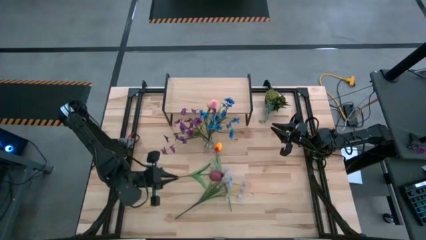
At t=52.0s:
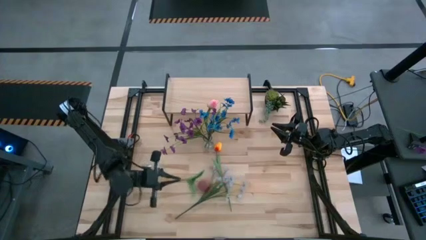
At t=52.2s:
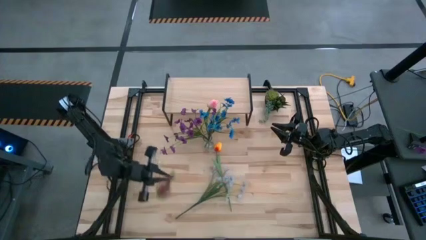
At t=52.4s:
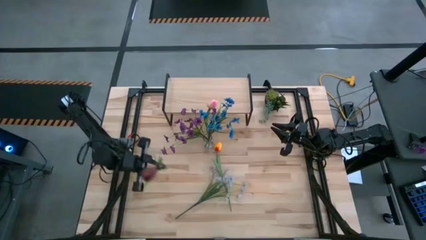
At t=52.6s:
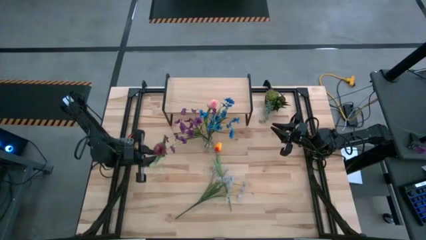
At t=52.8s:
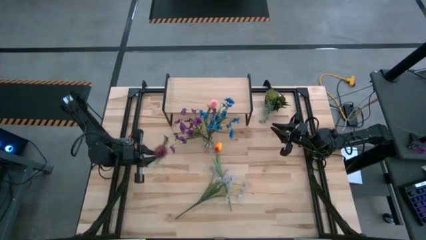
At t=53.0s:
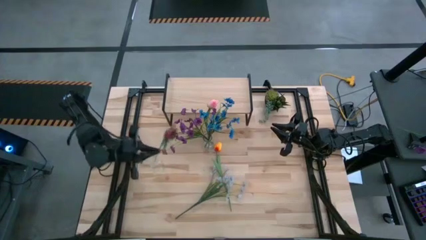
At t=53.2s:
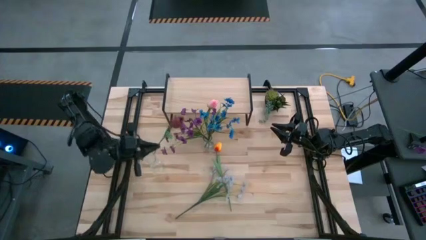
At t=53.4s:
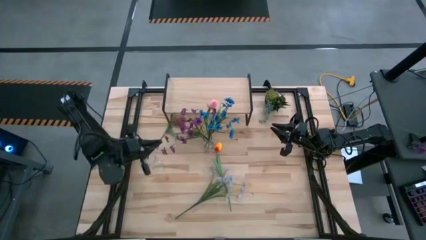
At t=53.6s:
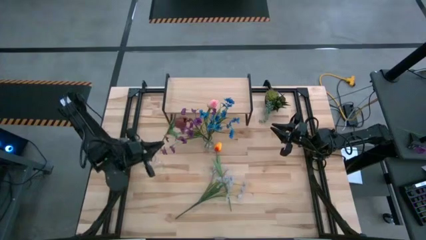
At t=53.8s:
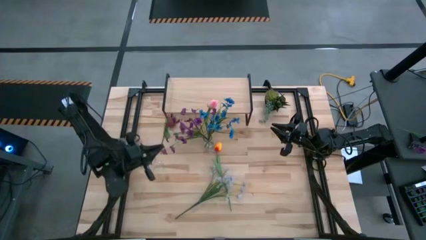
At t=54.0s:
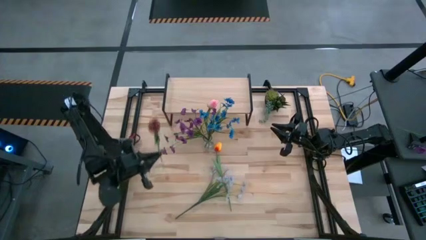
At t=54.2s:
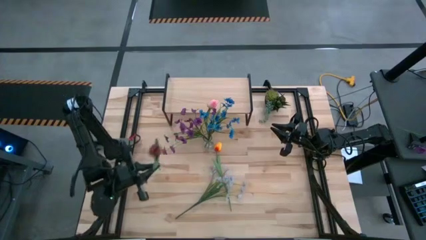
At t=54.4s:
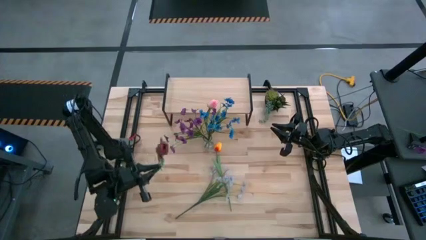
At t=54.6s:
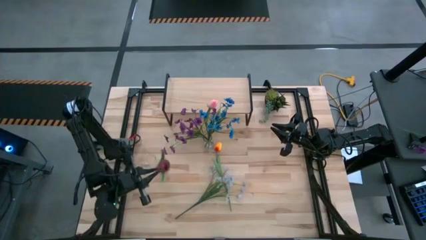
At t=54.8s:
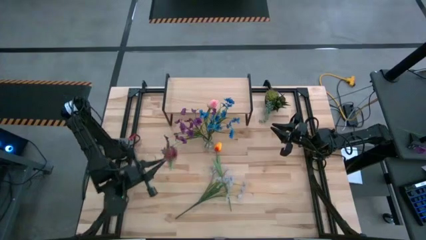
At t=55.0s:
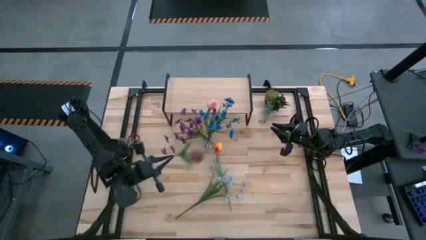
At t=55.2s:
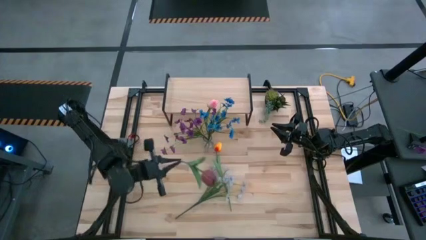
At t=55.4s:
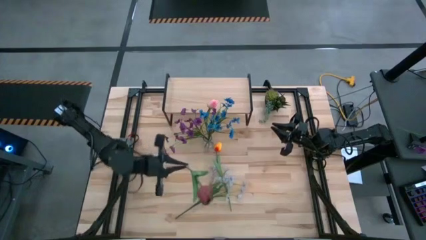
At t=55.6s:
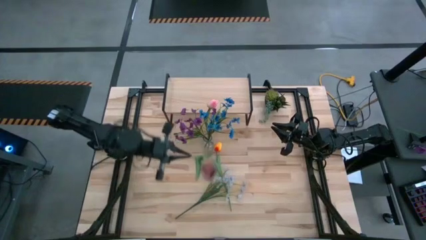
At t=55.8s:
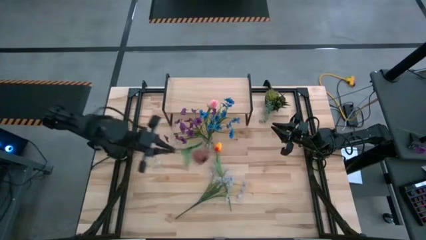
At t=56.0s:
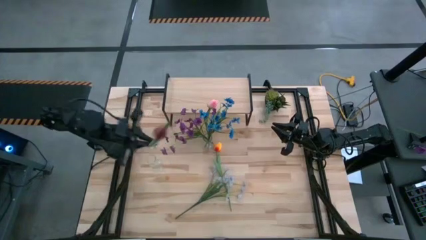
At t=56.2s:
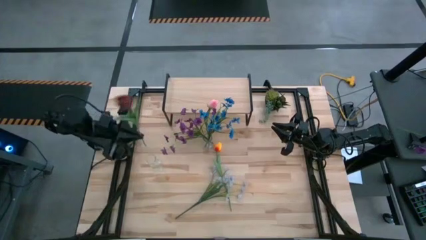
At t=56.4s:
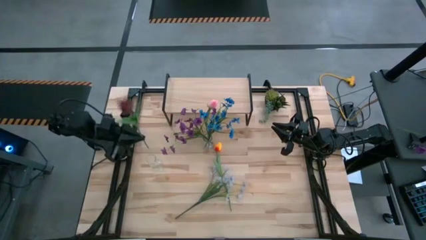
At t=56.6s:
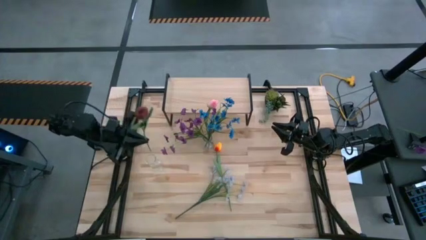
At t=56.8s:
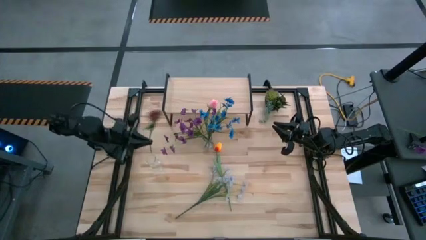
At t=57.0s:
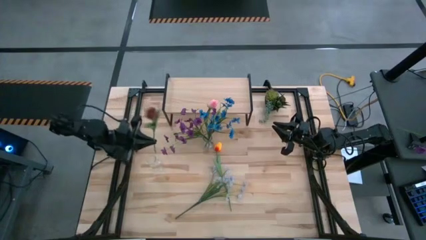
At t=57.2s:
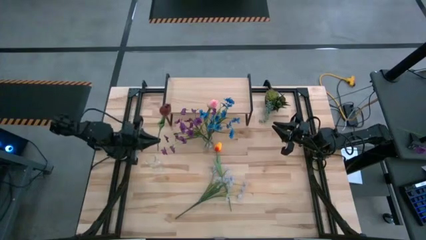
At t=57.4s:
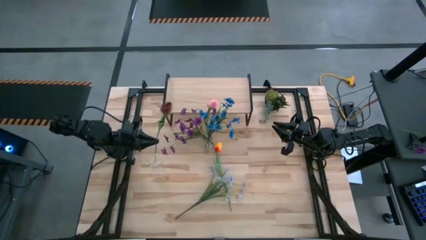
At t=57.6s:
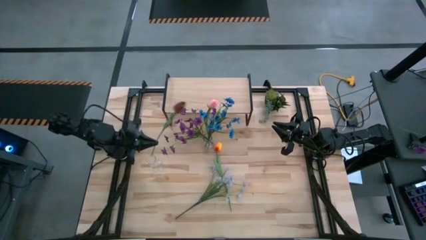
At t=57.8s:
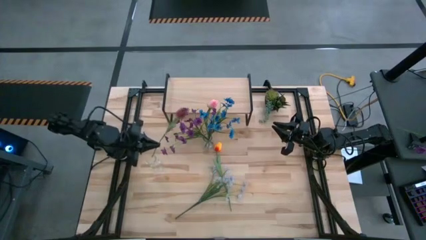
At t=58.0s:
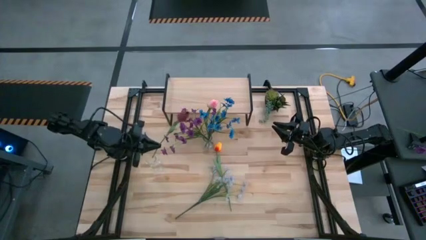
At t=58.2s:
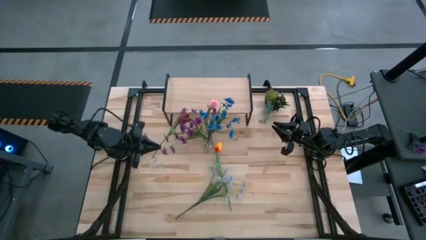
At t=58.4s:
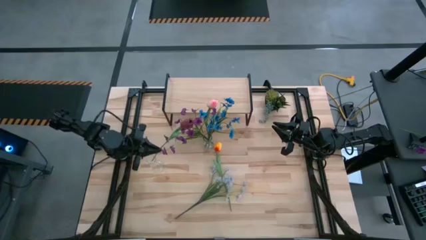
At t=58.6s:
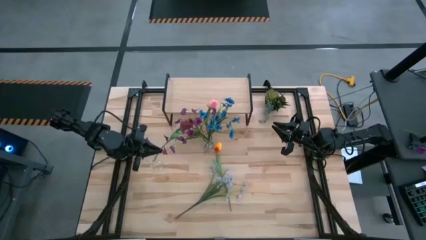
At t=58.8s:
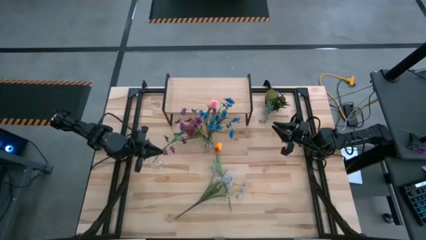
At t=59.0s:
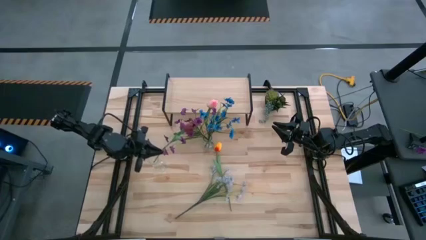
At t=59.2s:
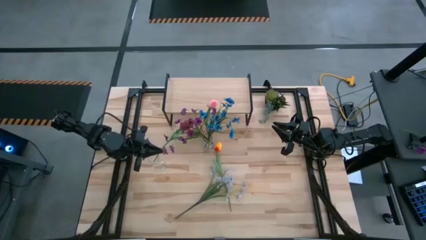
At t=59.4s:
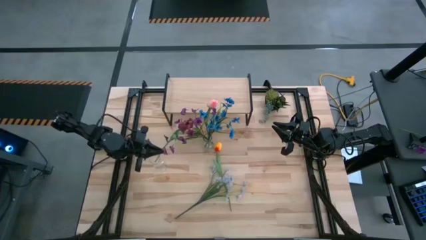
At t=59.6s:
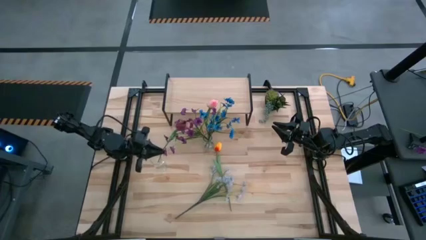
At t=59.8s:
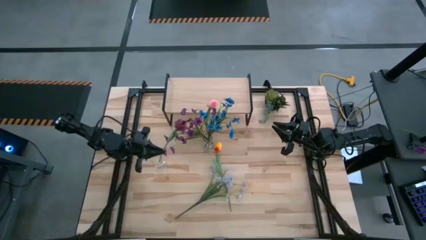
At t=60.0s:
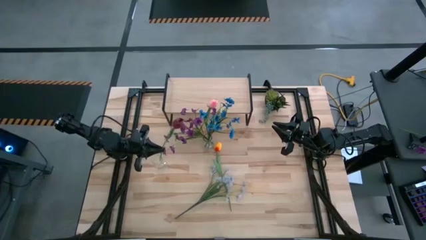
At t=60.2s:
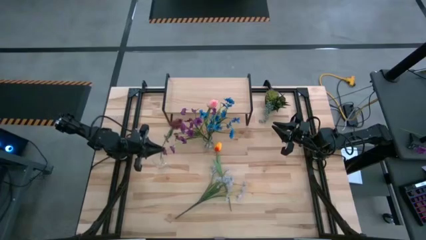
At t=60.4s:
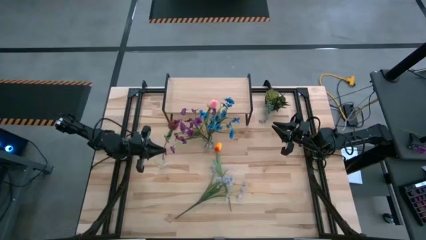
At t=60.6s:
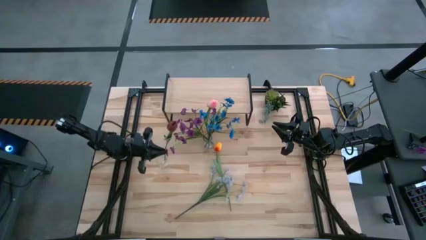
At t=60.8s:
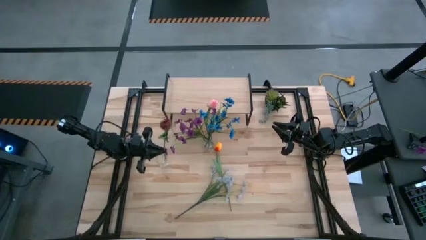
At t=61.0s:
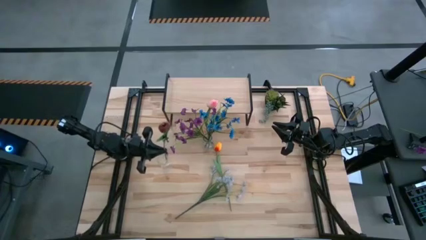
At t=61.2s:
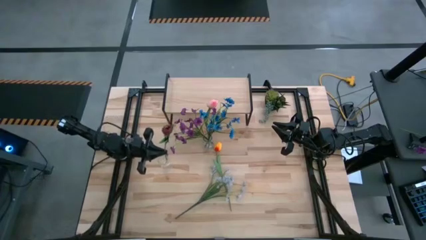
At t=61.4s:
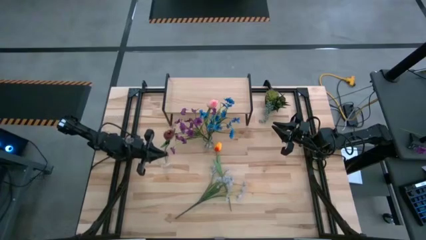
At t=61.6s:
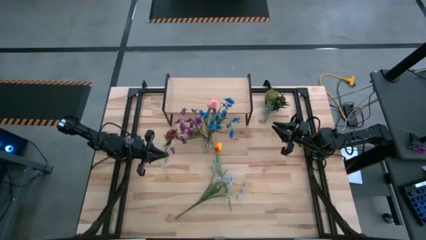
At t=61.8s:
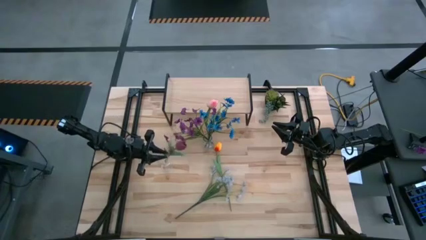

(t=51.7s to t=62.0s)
Task: Pick and place flowers into a vace then onto a shelf
Put the red flower into the left transparent vase

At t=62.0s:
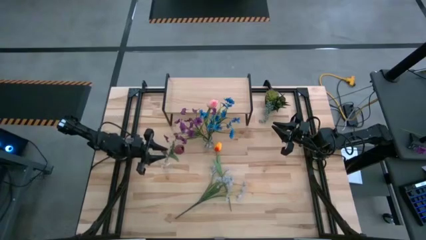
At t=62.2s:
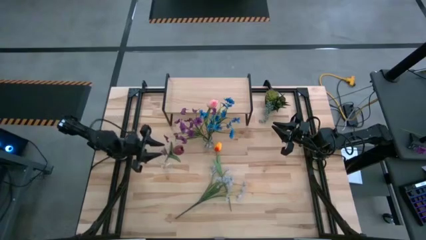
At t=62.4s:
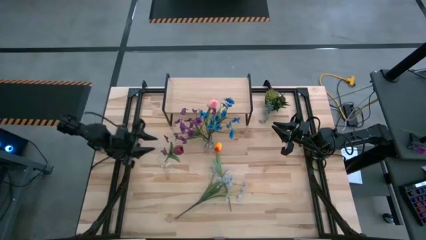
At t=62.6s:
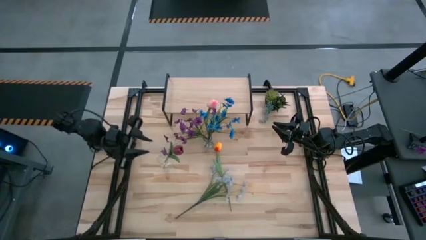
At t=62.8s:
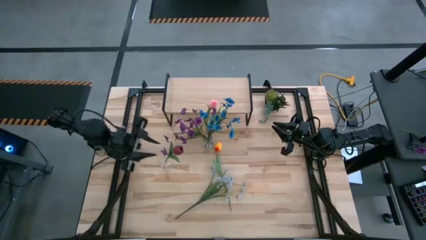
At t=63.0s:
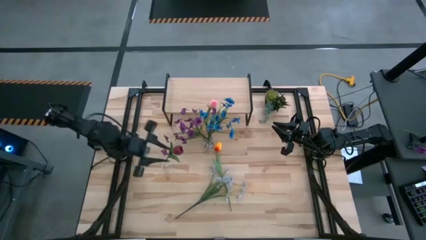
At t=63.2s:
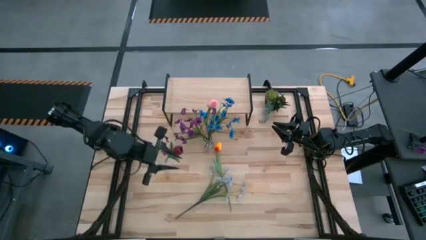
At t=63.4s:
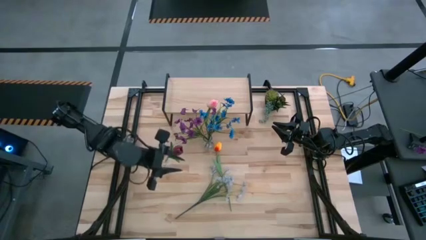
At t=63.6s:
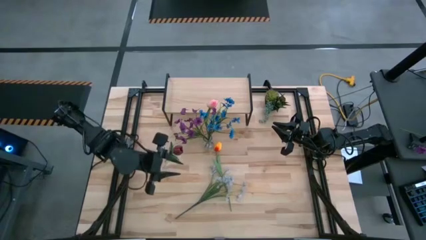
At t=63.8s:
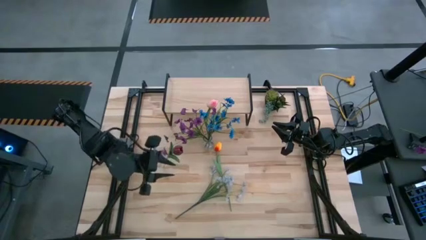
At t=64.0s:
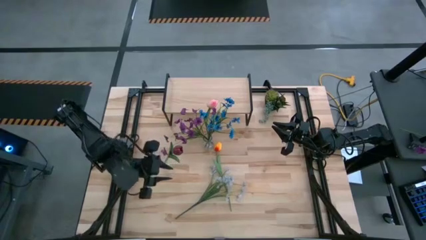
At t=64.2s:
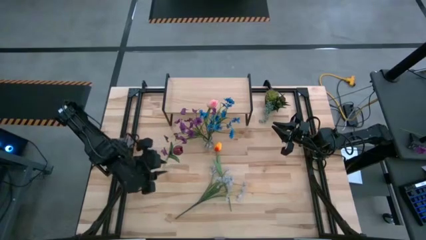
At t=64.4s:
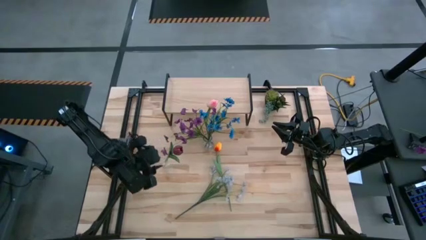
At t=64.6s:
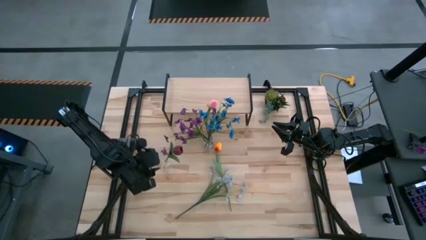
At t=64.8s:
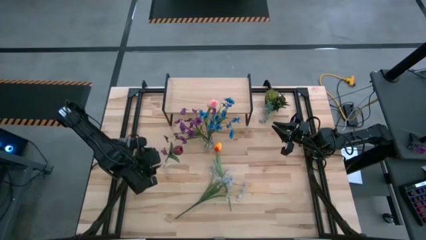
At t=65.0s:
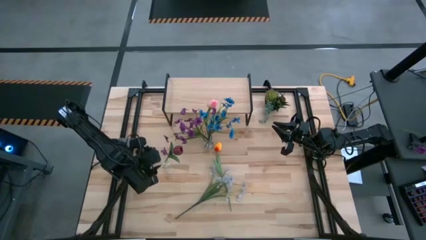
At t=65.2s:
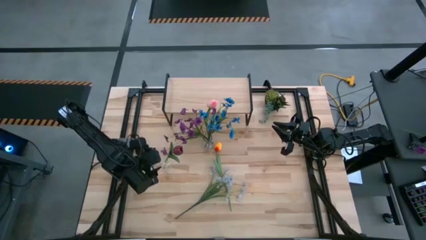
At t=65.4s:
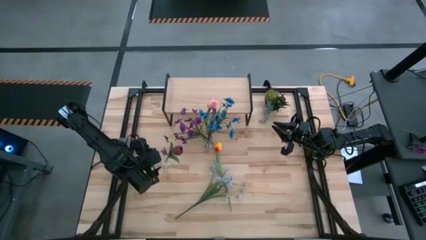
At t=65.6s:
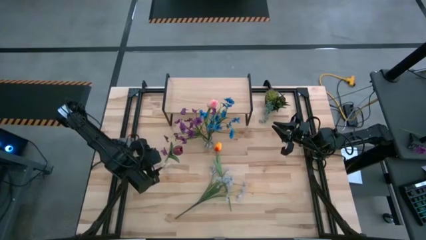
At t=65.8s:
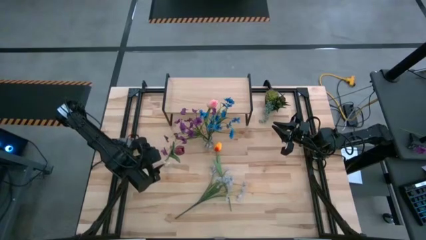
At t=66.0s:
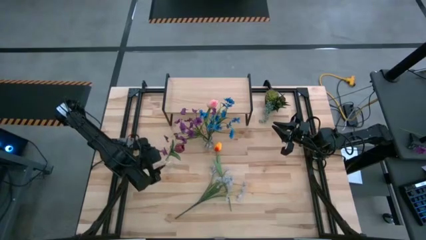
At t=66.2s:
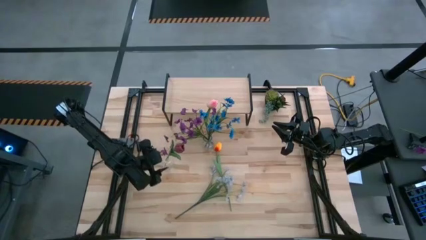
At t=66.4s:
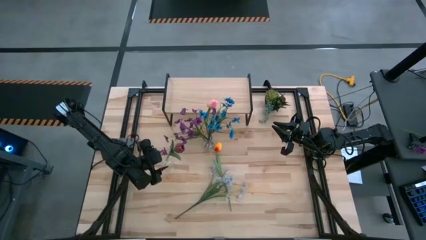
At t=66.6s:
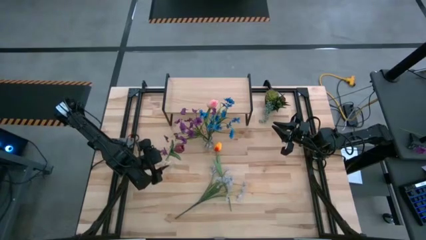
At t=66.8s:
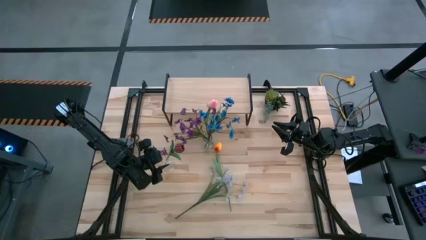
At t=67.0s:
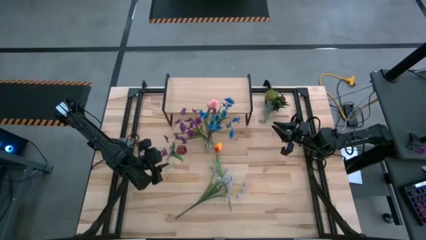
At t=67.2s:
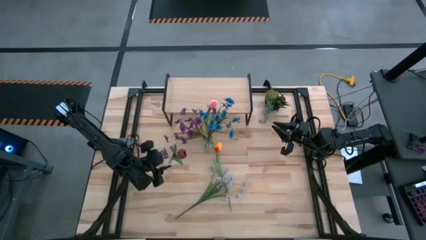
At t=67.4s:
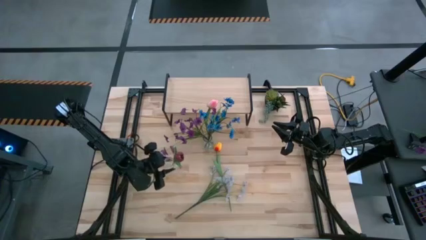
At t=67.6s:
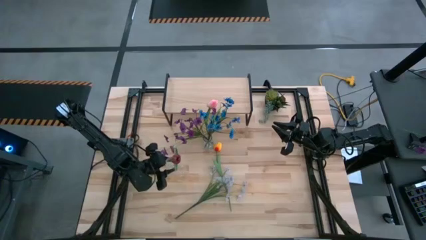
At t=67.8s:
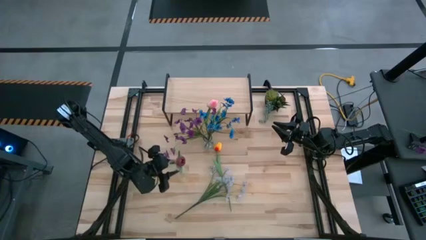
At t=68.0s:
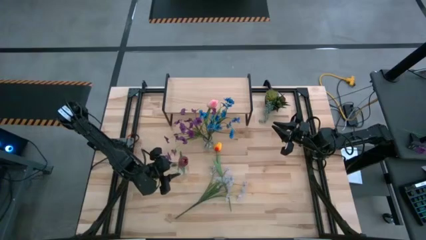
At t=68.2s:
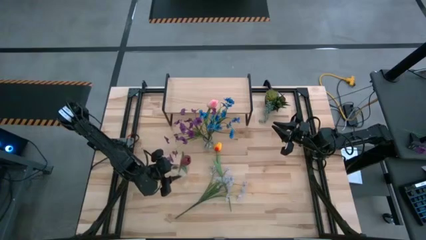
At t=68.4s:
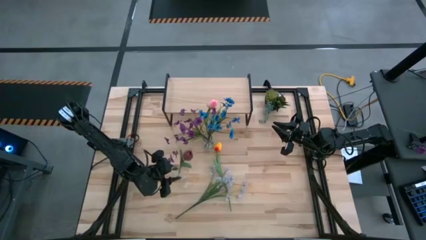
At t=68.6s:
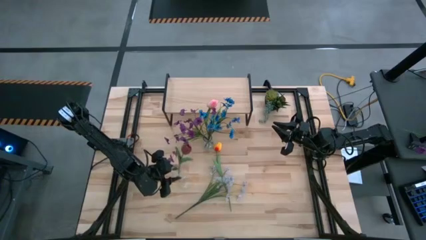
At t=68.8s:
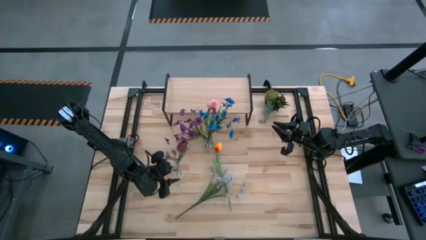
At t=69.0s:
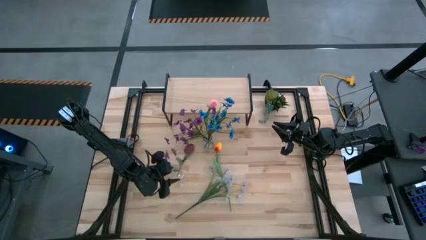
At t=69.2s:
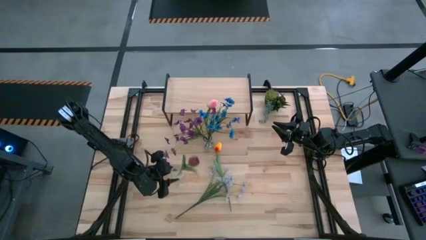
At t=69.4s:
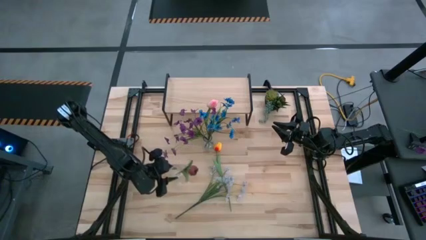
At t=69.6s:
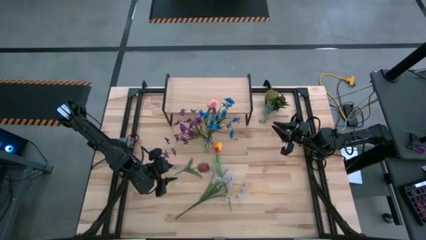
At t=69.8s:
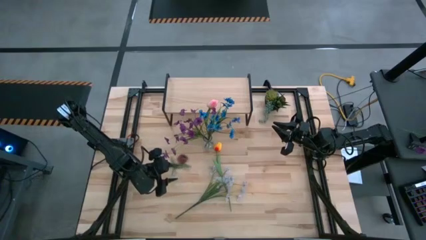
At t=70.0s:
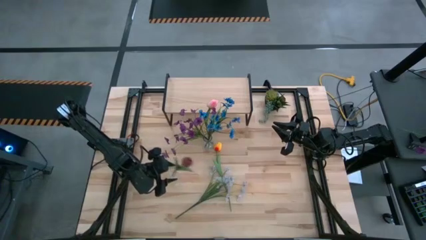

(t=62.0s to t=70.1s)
Adjust the left transparent vase
